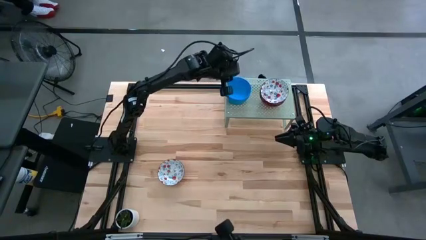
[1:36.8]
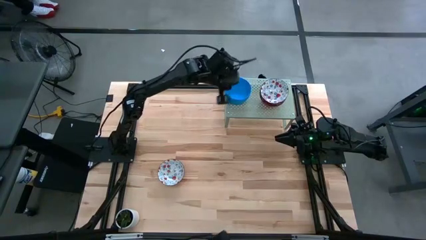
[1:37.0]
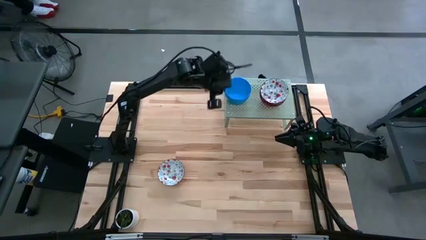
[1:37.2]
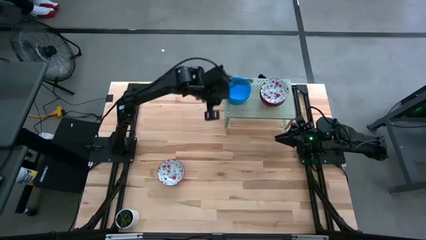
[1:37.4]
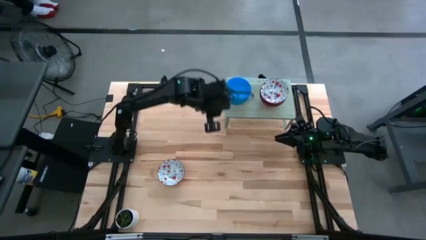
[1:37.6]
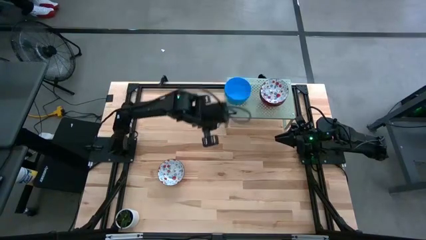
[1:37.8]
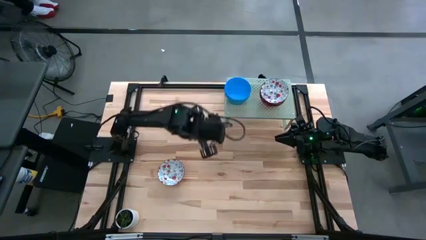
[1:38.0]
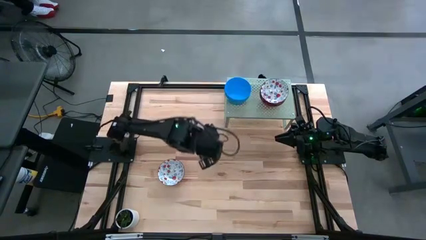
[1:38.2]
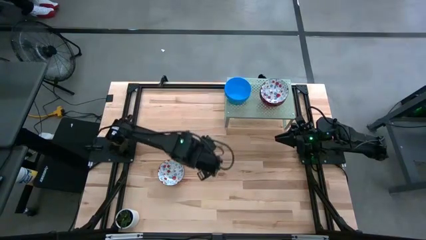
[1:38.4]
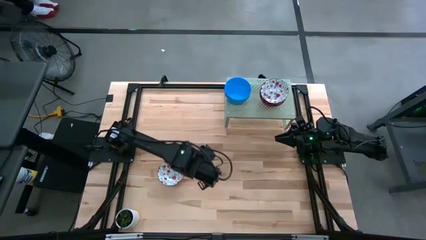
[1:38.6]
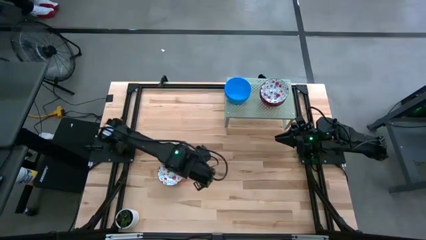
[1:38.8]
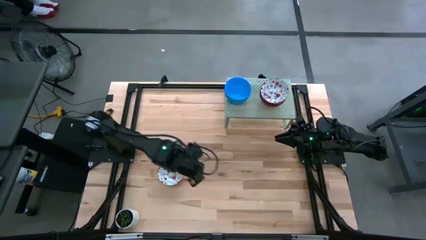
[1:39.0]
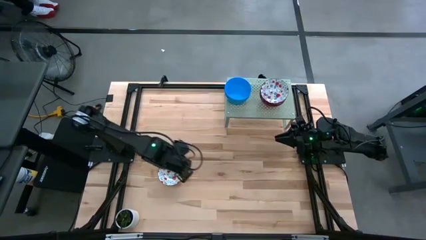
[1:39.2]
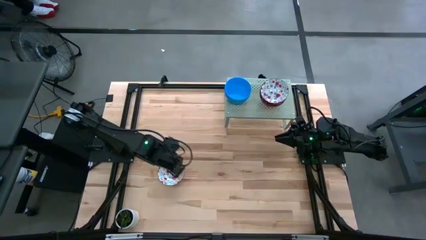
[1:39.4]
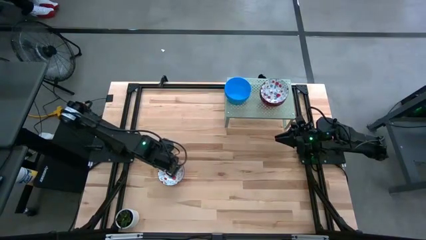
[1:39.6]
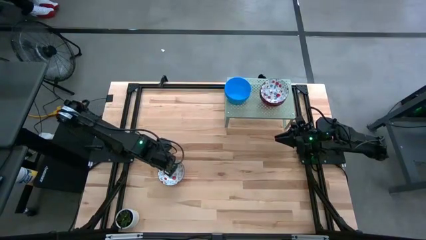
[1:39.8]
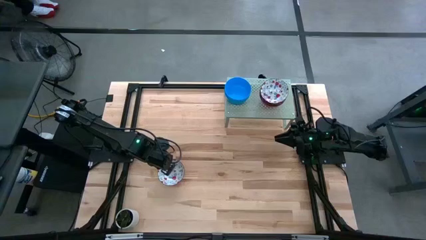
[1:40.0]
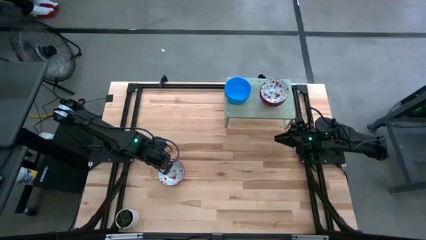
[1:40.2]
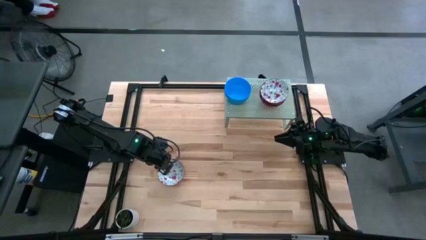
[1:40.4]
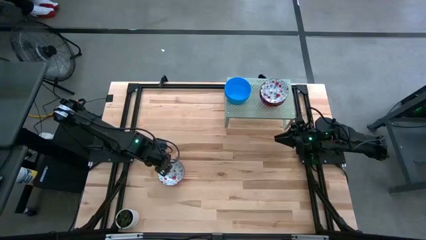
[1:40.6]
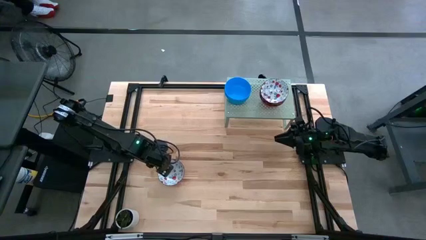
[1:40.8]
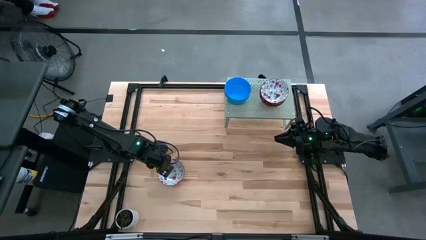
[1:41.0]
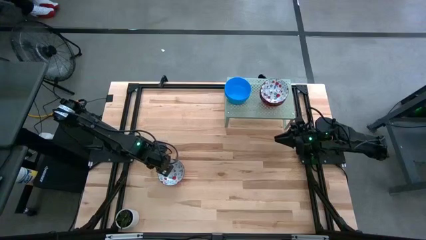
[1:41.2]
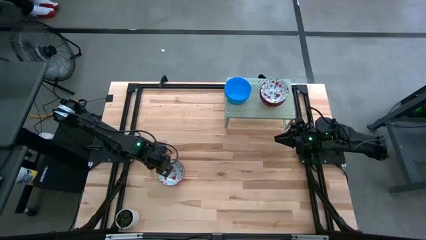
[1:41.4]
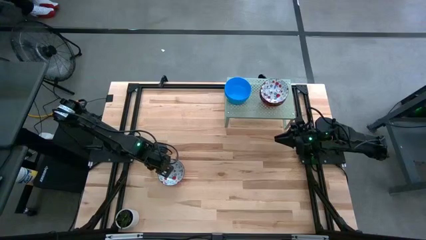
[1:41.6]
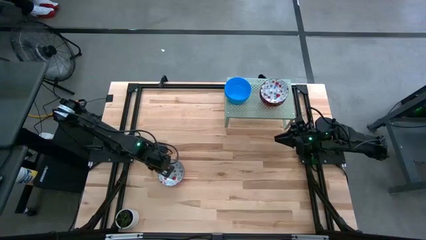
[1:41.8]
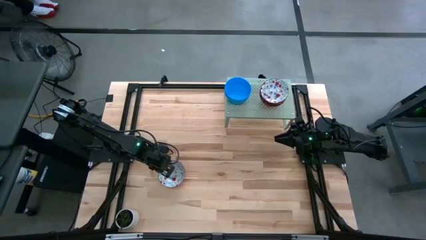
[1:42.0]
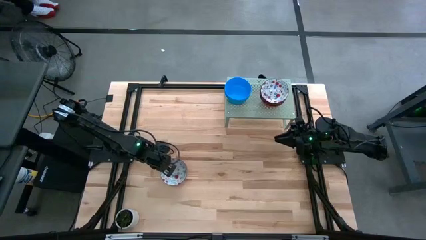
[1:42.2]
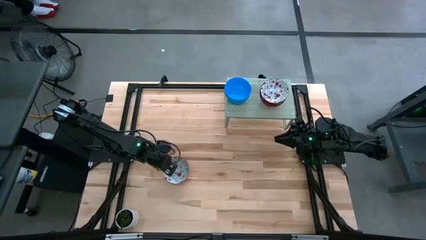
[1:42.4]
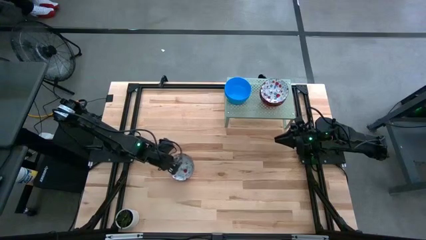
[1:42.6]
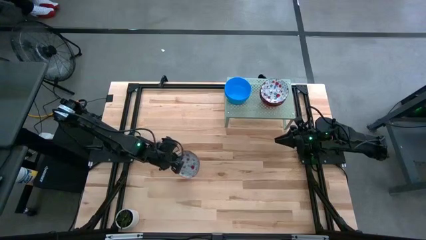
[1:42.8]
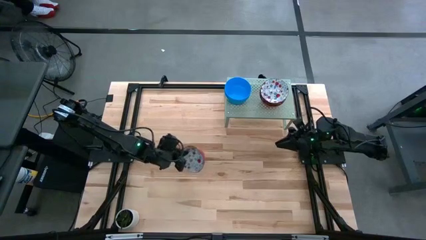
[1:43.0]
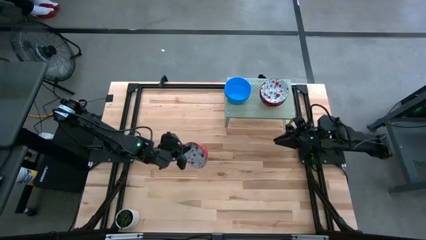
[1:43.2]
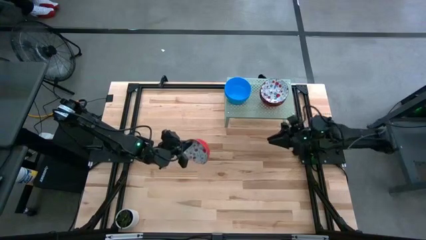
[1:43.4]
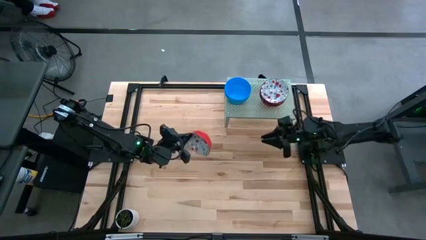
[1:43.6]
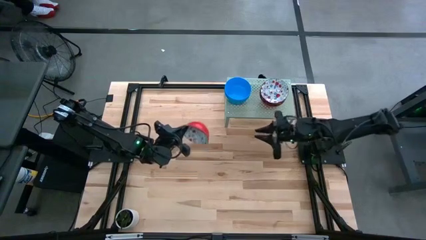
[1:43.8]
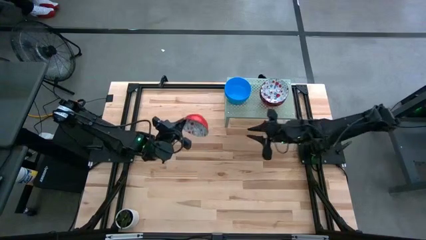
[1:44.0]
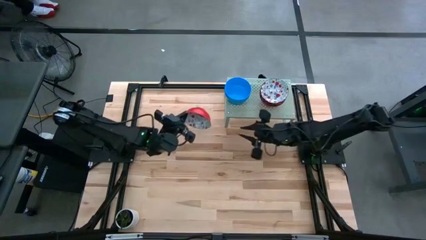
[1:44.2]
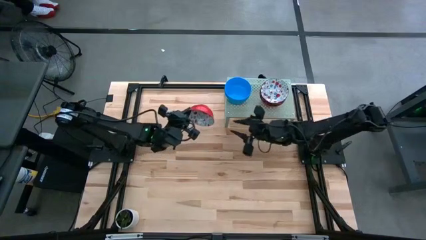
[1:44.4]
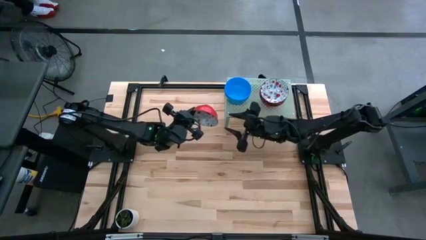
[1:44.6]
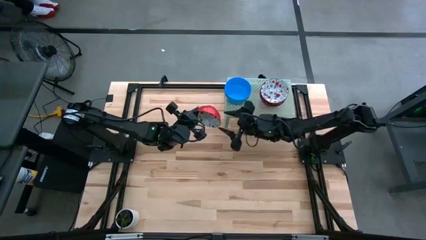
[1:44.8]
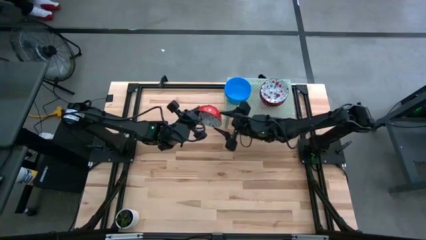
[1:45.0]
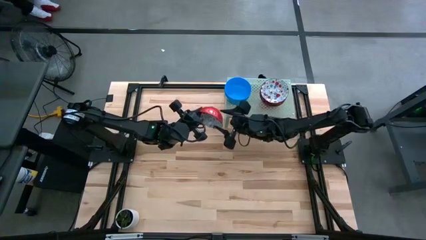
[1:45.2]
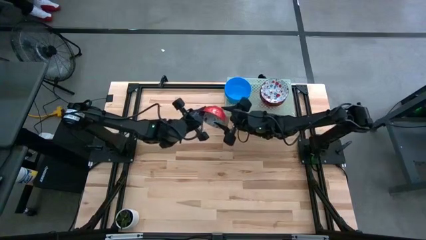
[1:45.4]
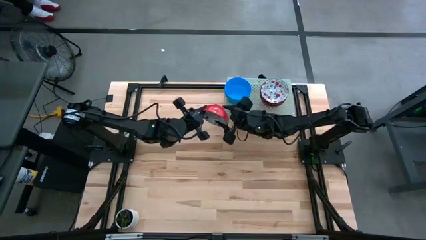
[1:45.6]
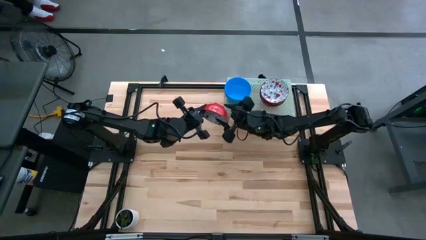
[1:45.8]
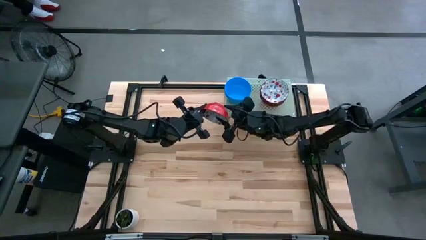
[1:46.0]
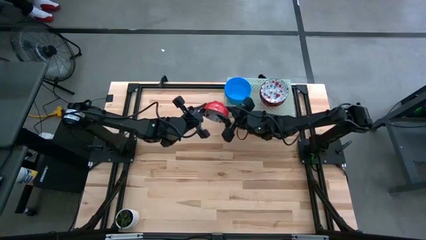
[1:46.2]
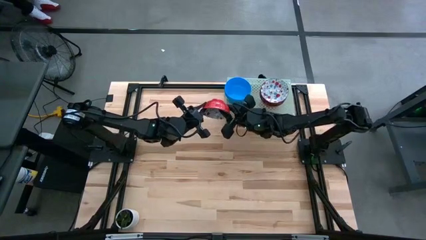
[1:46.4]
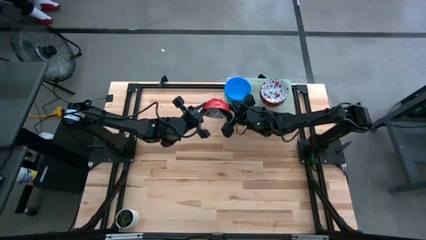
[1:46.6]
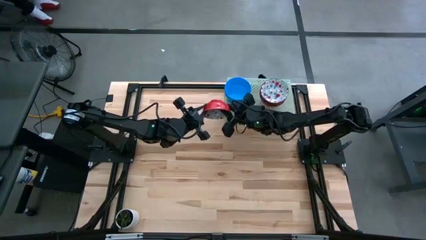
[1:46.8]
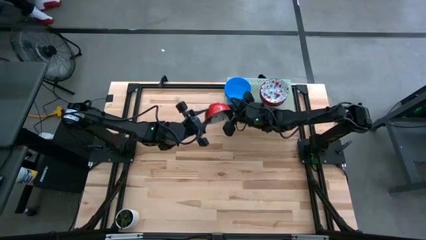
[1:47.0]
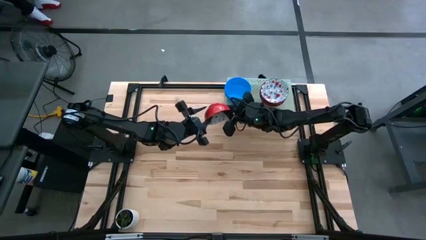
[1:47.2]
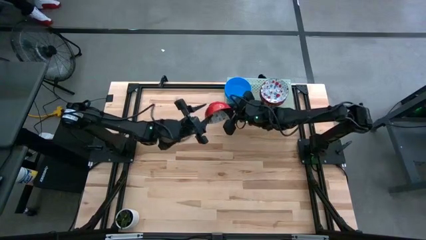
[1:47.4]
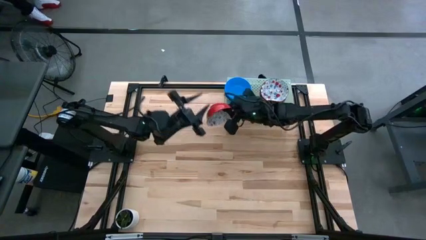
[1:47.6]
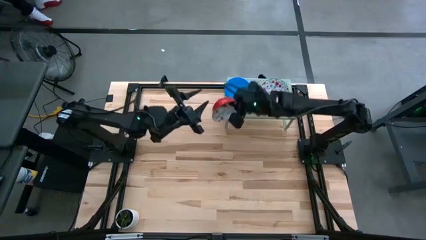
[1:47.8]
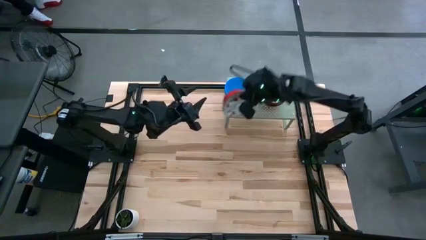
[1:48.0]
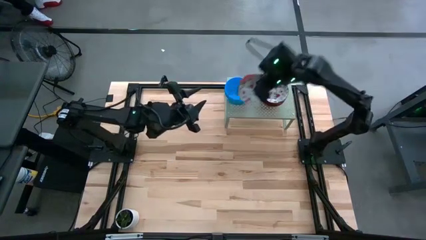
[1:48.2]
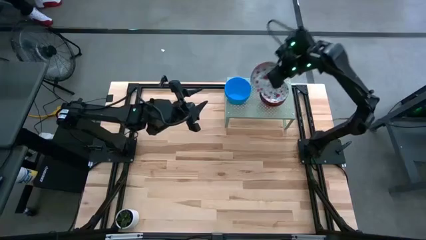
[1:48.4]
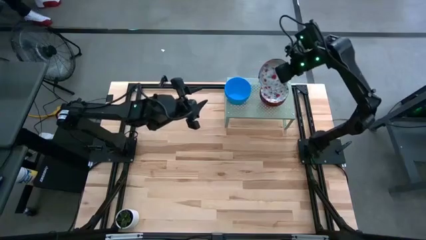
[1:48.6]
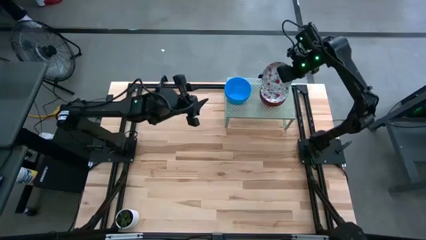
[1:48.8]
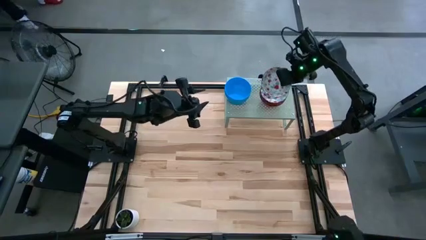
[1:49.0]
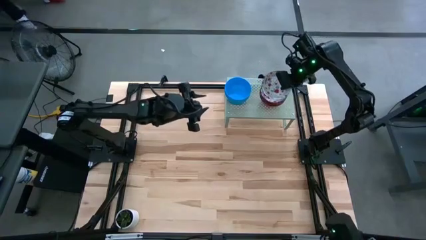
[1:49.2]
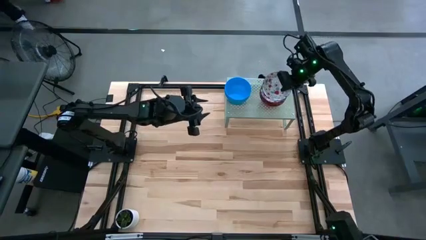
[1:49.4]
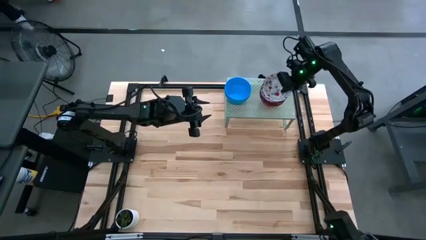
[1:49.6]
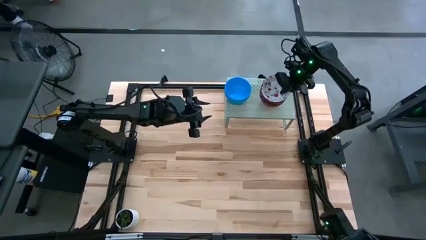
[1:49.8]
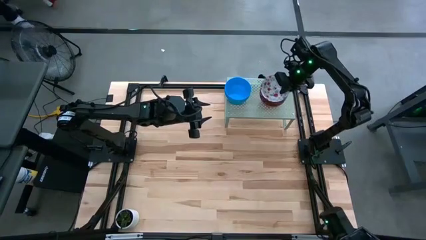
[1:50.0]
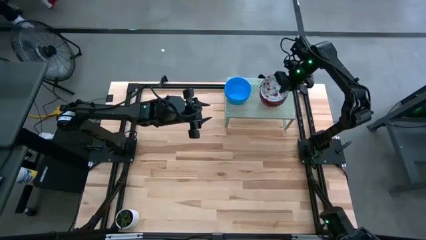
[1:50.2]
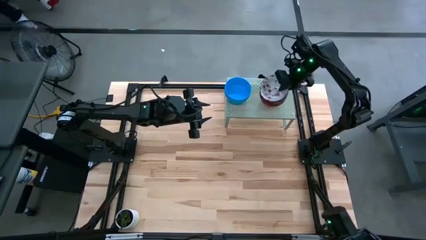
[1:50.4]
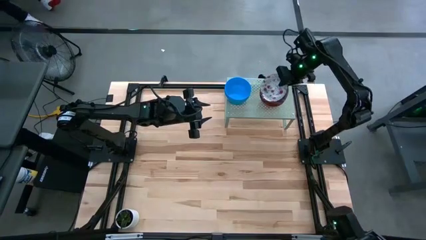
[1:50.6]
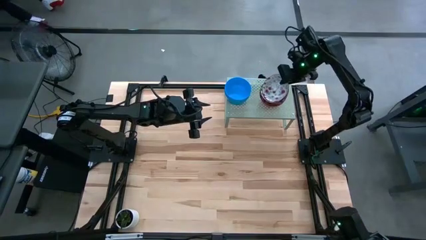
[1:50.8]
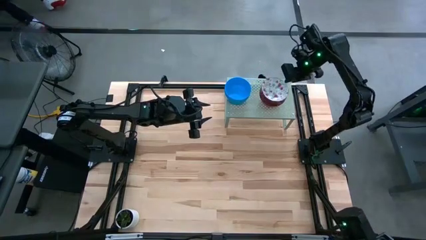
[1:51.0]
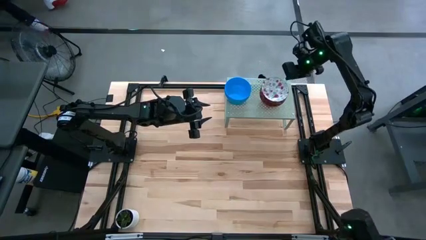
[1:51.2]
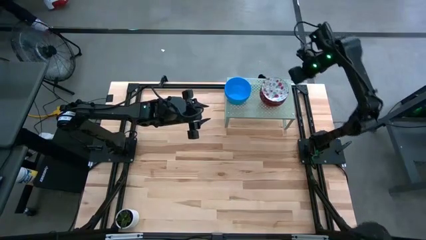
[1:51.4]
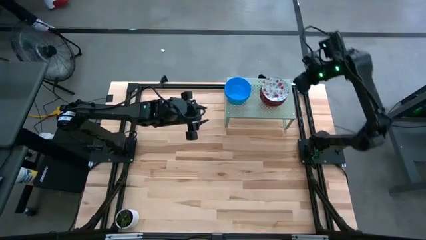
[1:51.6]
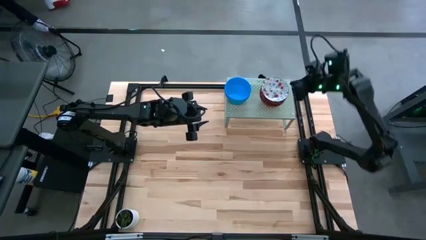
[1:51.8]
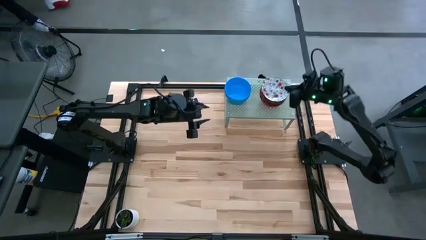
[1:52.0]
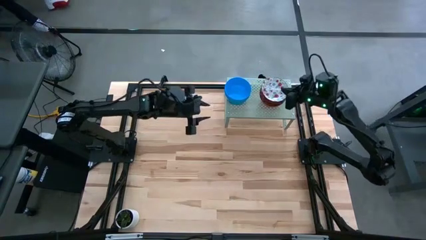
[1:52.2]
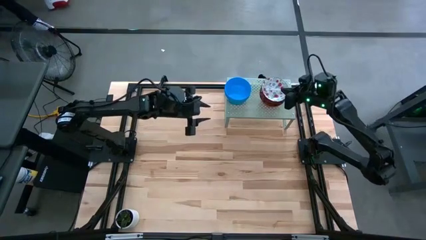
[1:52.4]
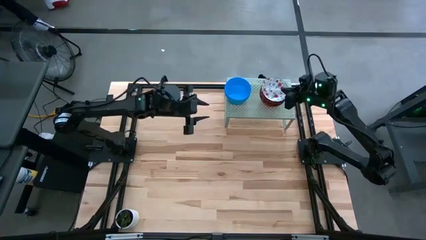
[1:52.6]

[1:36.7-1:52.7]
Task: Pick & Place Mini bowls
Stack the white bowl on the white bowls on the shelf
